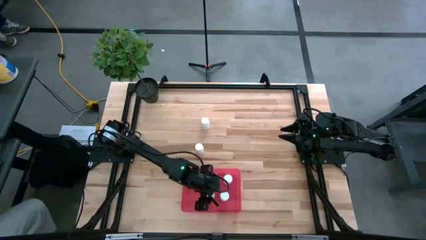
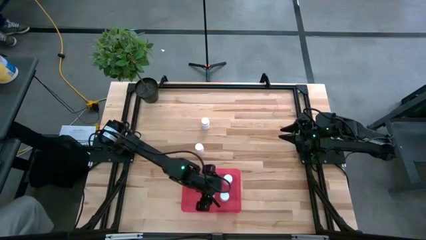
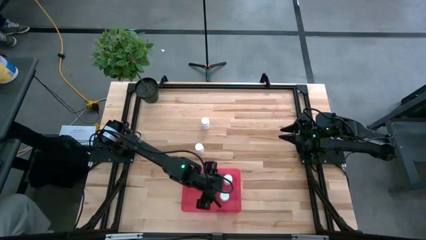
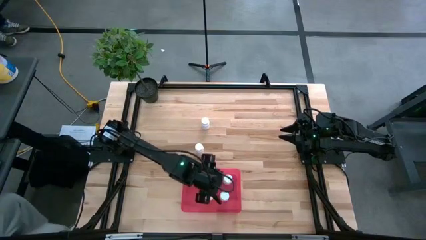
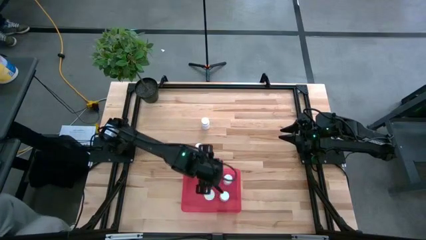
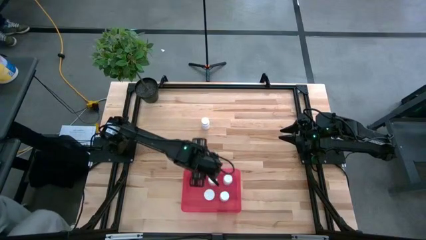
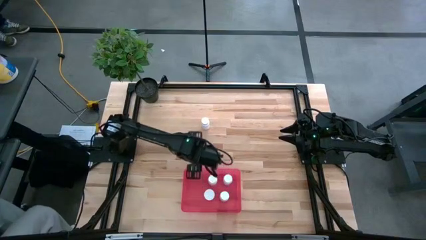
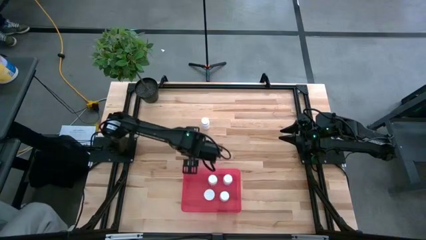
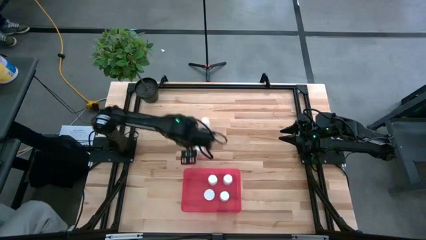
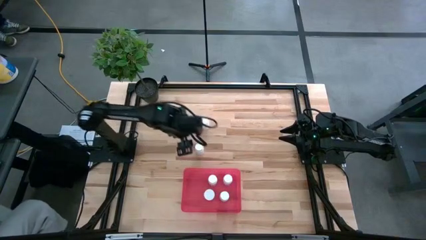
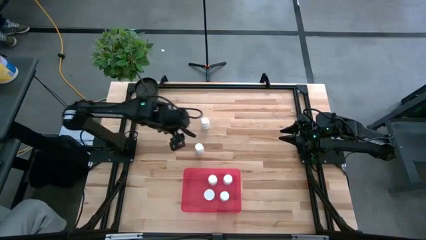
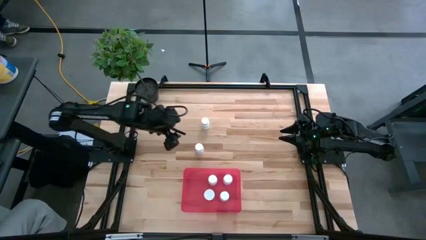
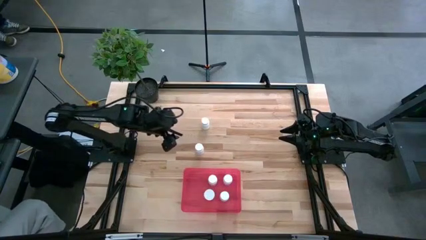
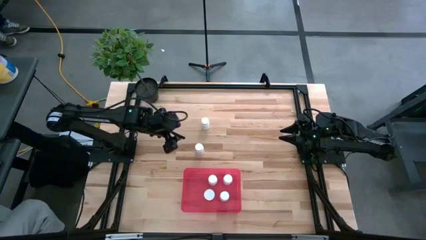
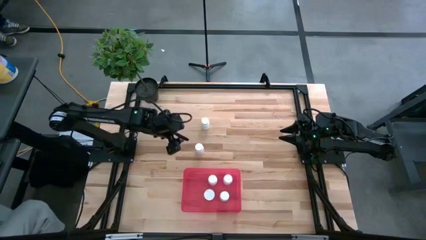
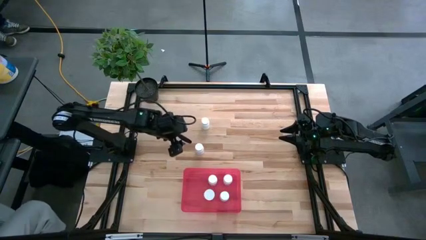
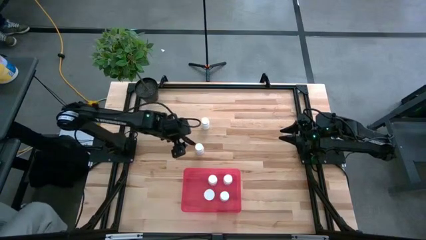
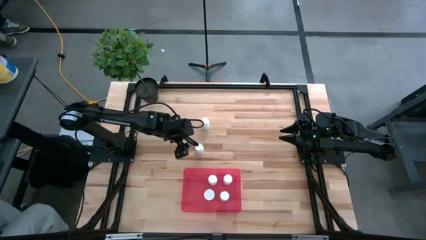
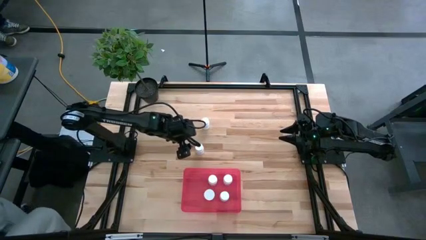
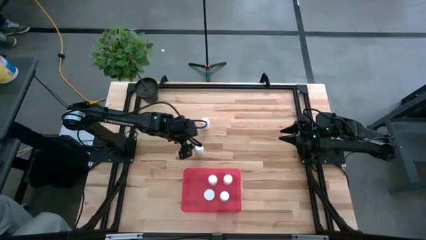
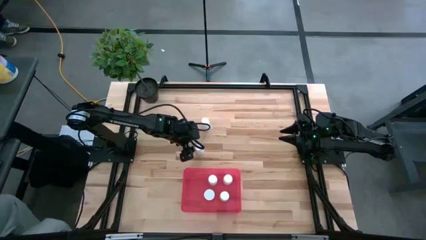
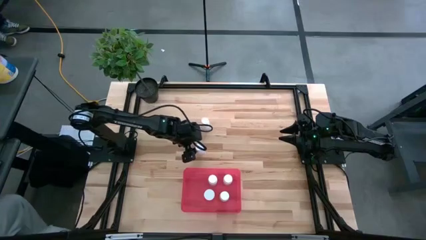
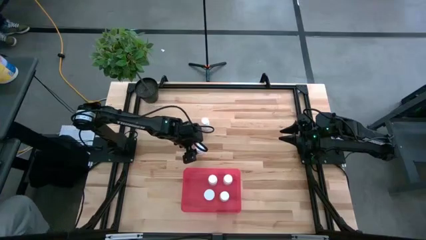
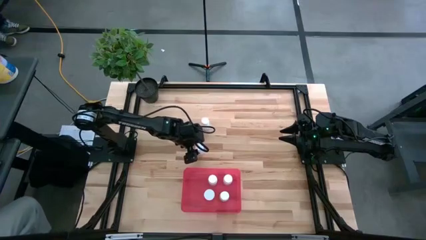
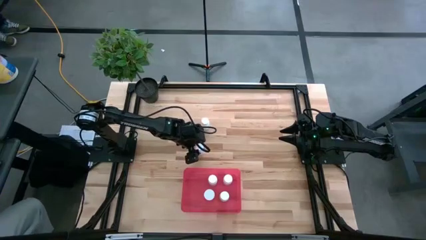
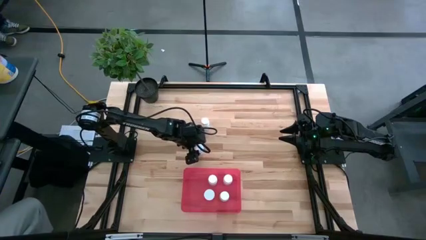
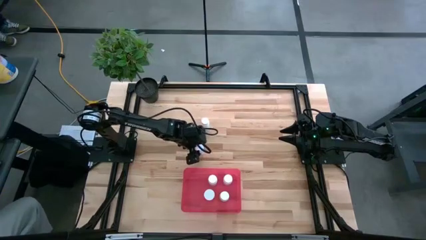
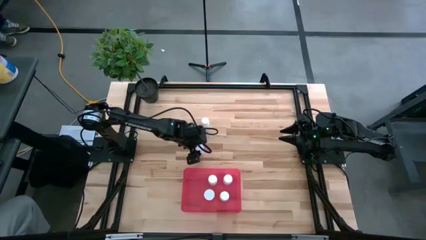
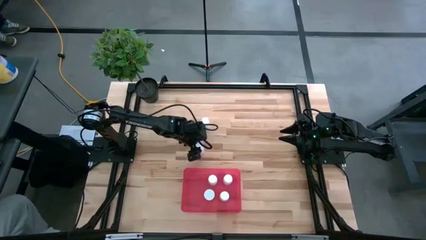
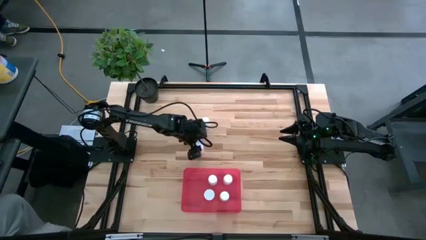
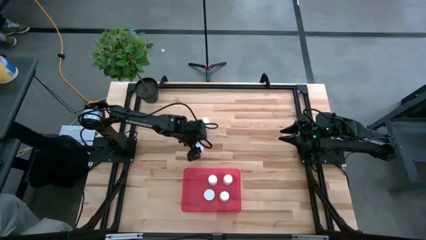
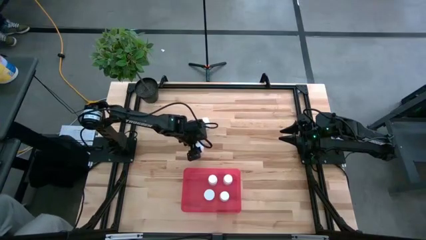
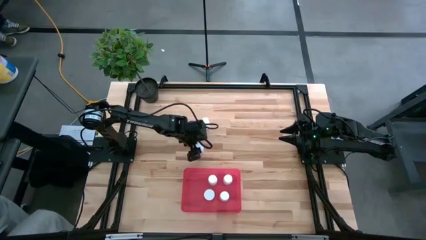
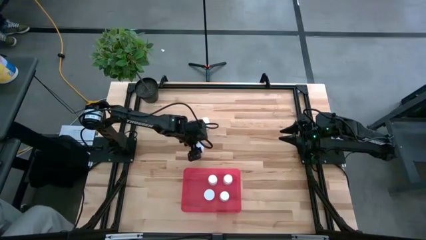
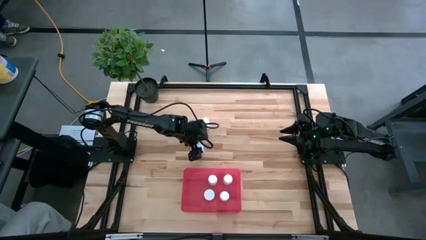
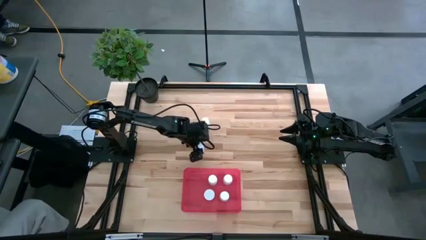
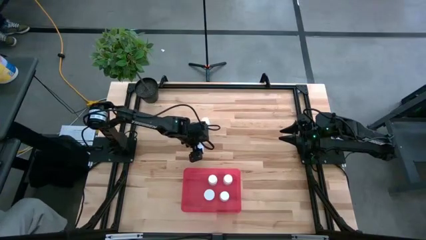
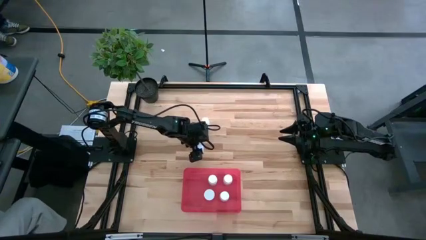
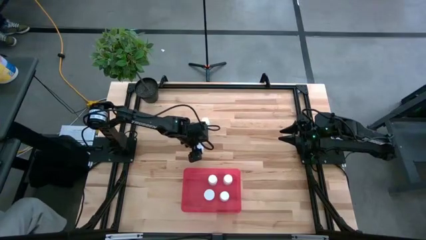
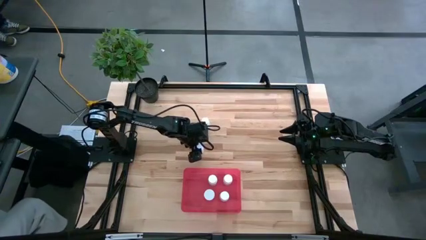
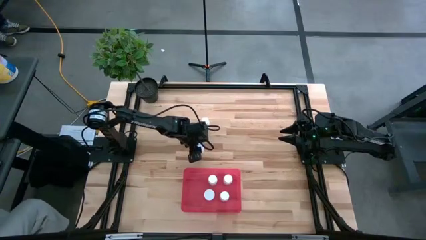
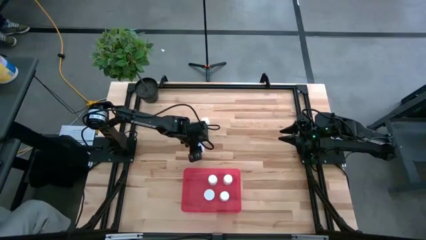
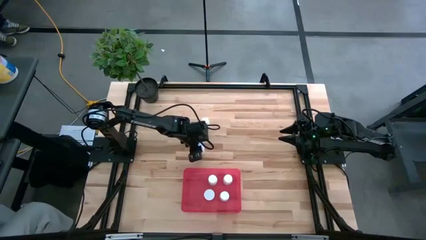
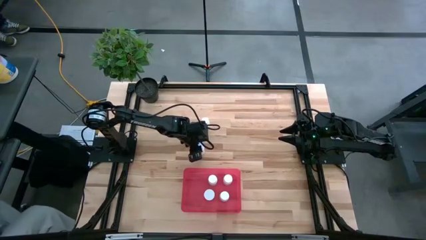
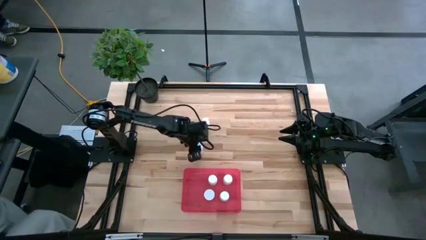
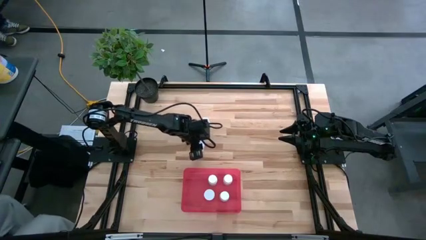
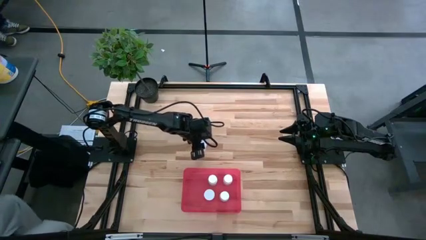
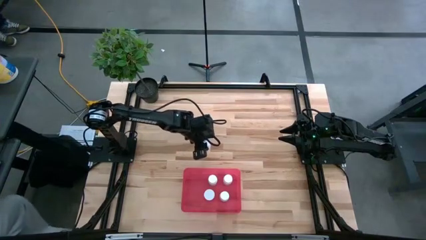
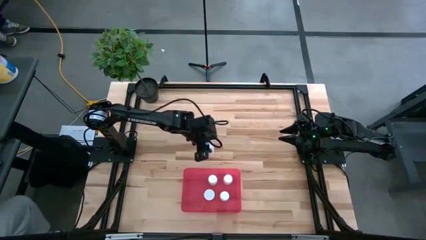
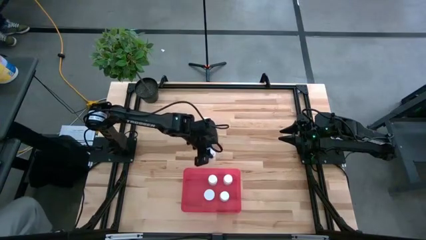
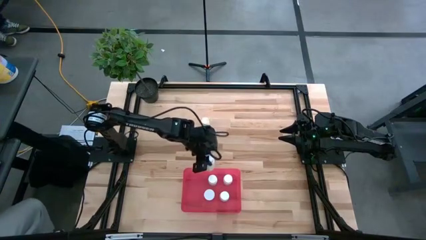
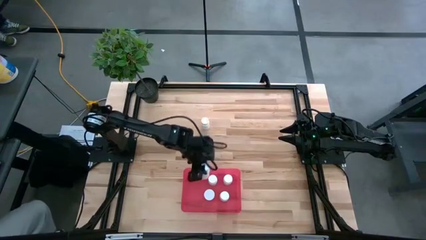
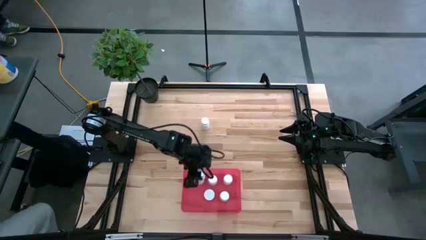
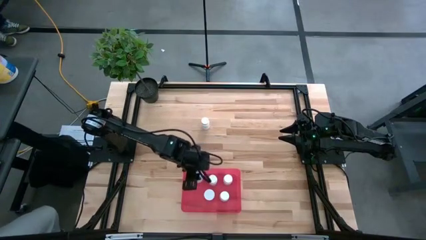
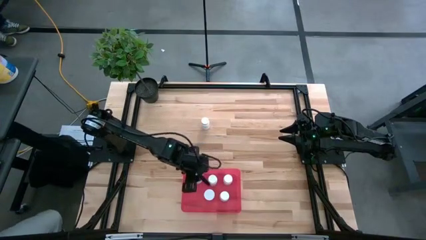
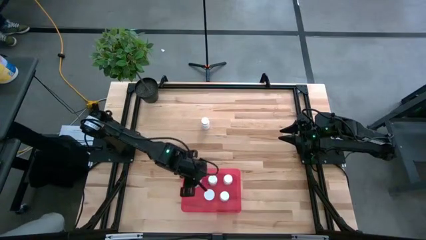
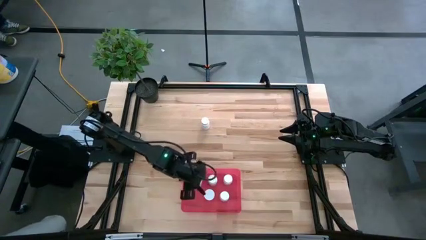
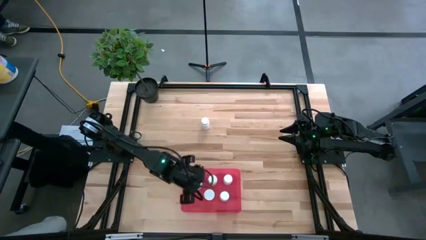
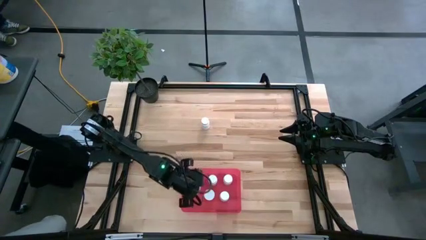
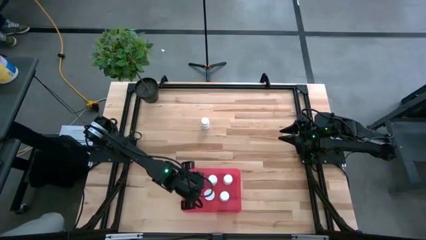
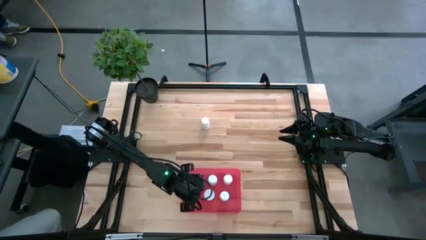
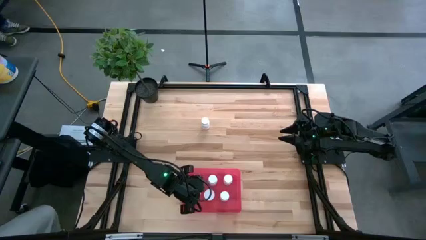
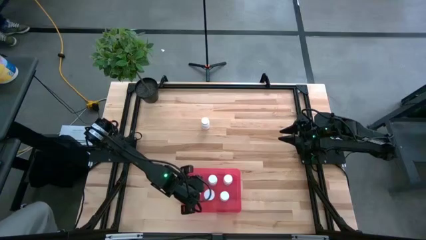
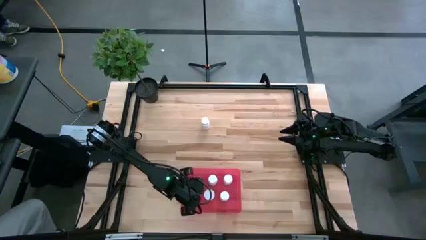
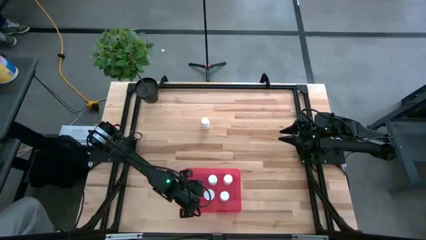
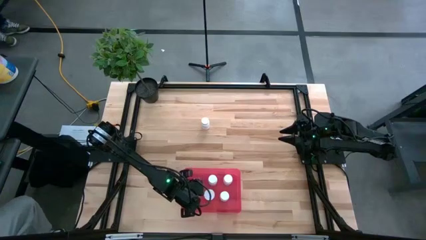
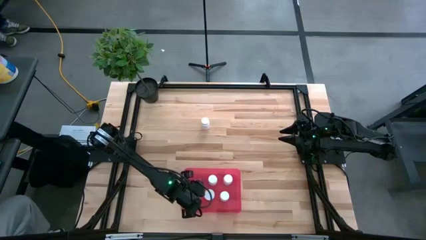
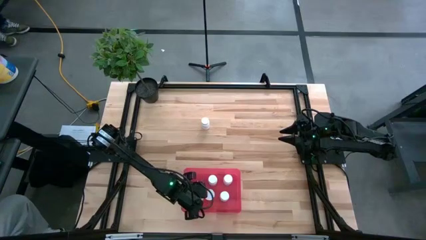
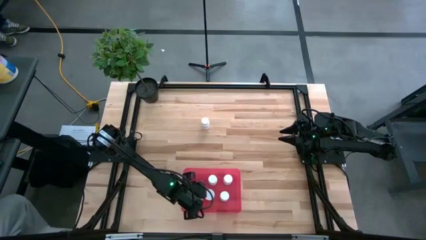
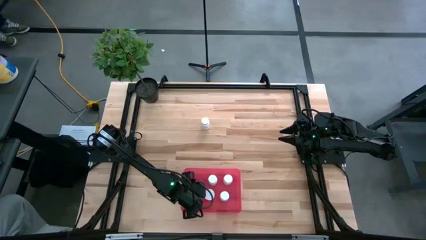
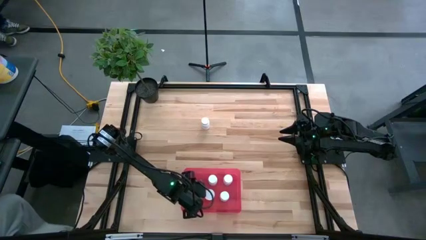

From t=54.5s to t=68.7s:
Task: Pick and place pill bottles into a basket
Put the white pill bottle into the bin
